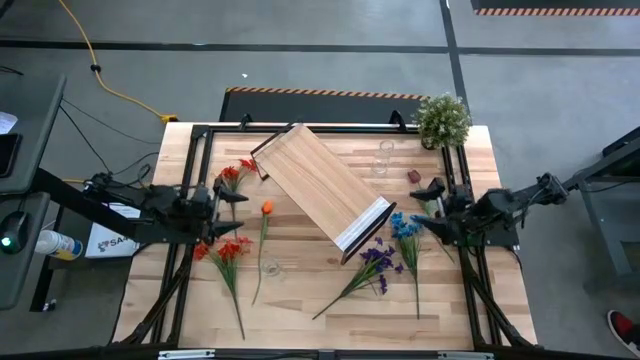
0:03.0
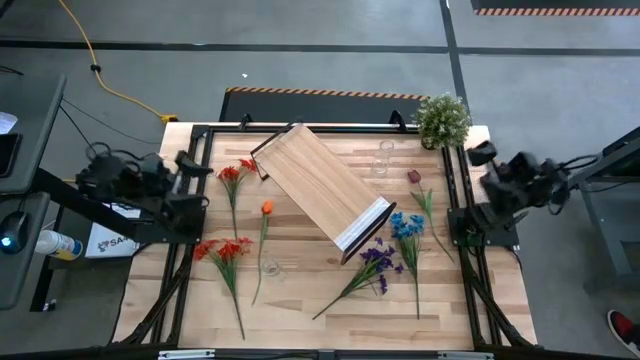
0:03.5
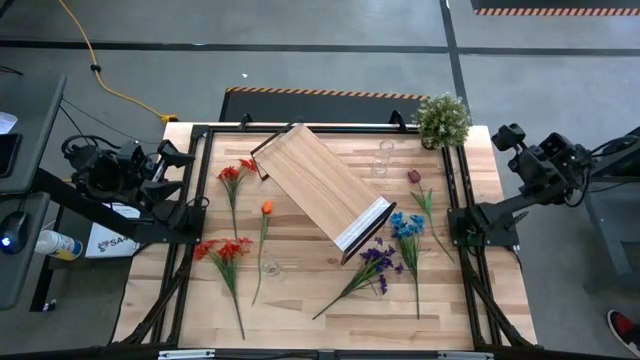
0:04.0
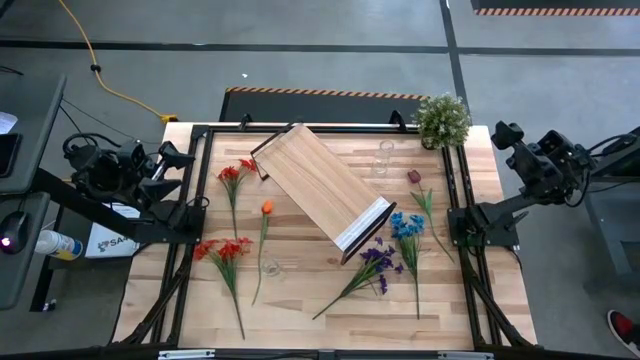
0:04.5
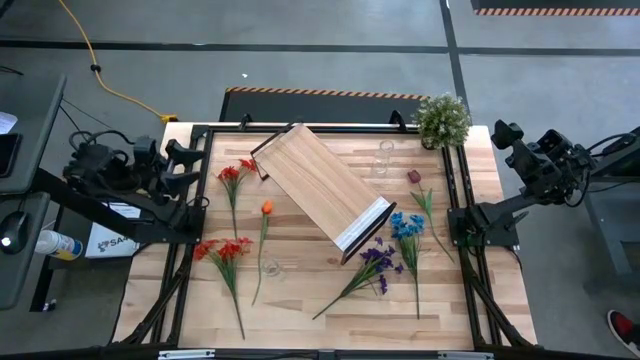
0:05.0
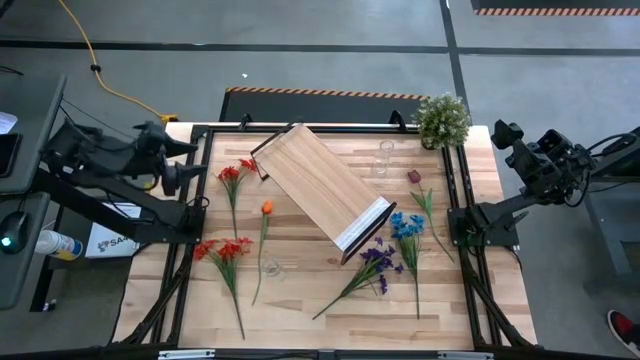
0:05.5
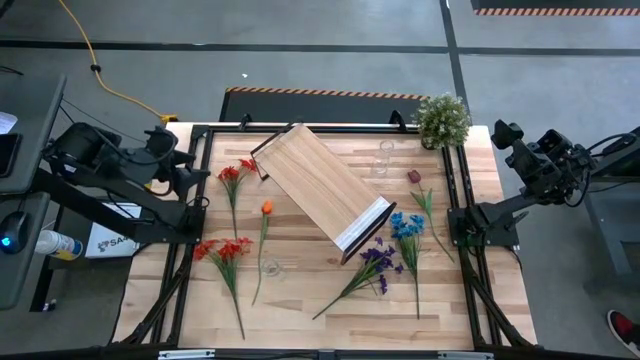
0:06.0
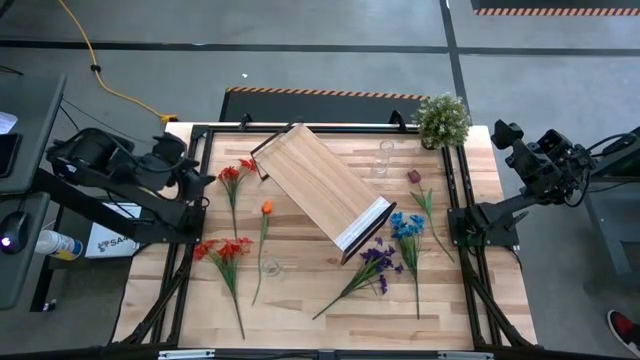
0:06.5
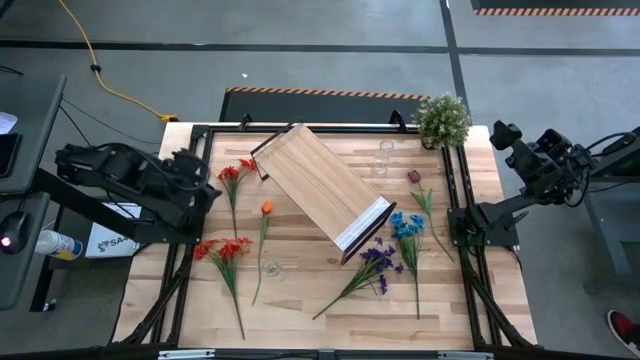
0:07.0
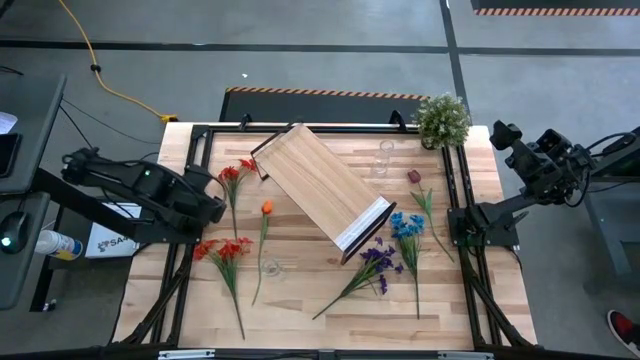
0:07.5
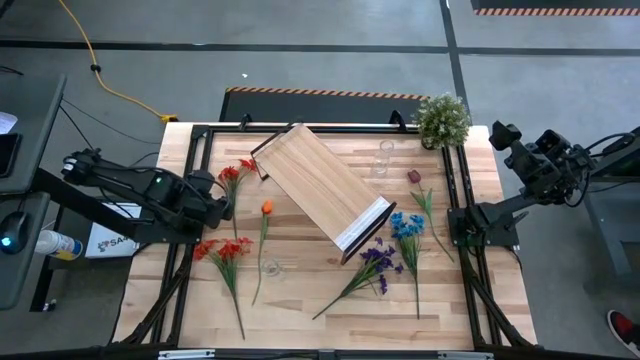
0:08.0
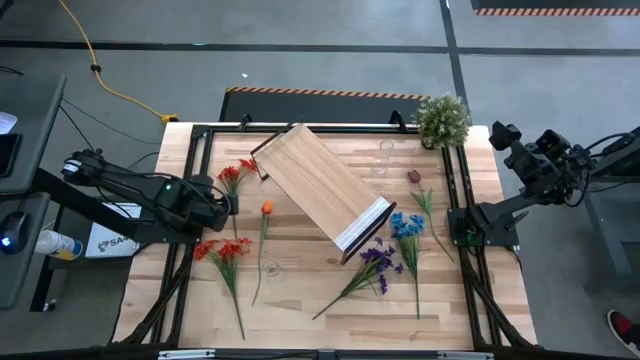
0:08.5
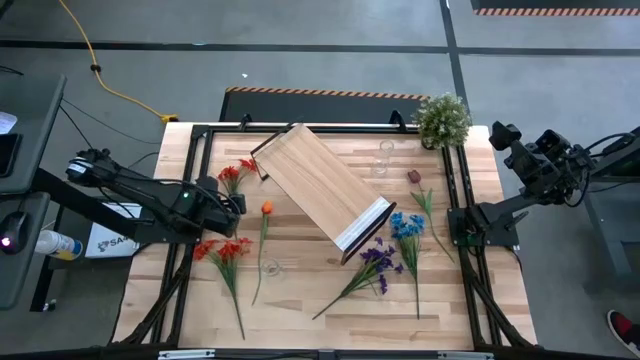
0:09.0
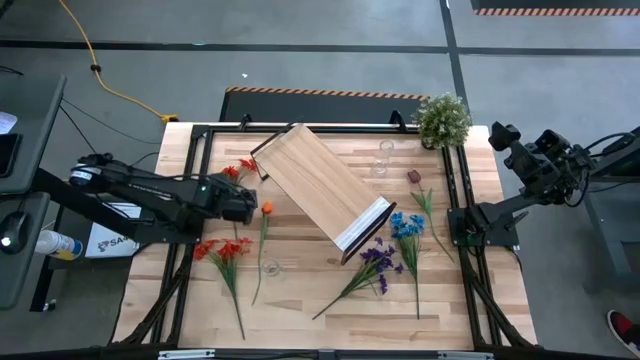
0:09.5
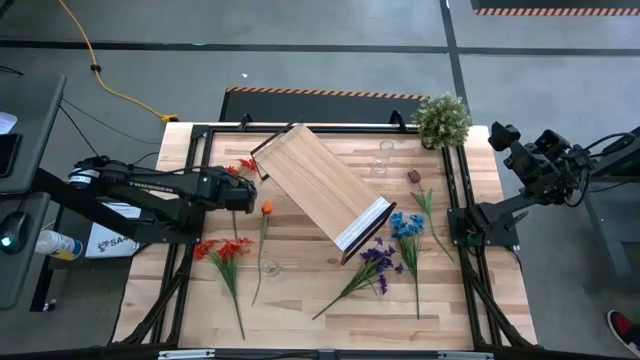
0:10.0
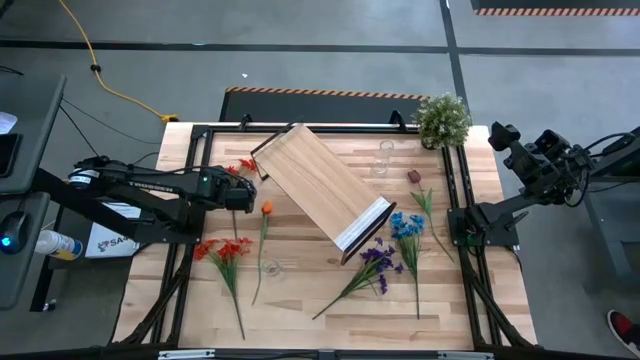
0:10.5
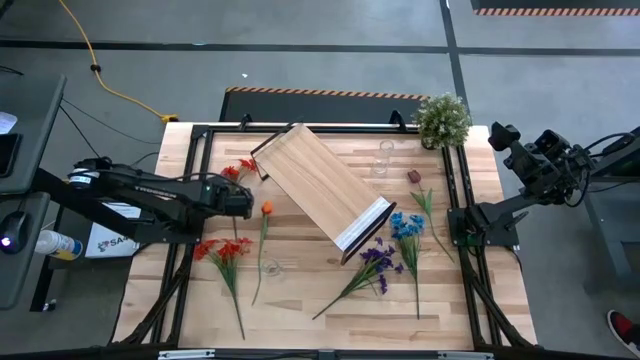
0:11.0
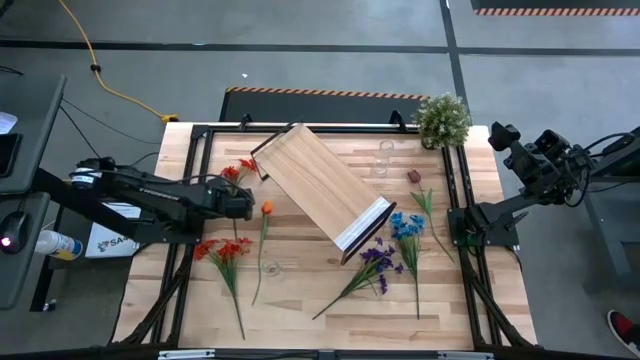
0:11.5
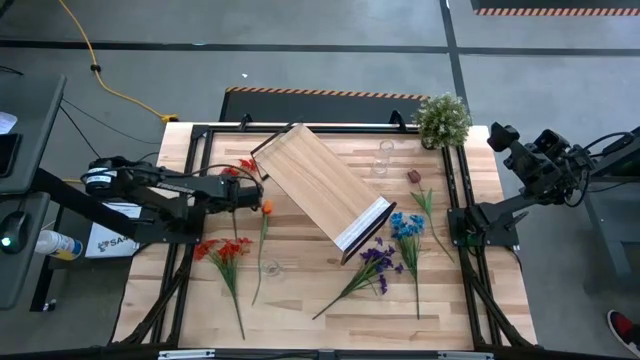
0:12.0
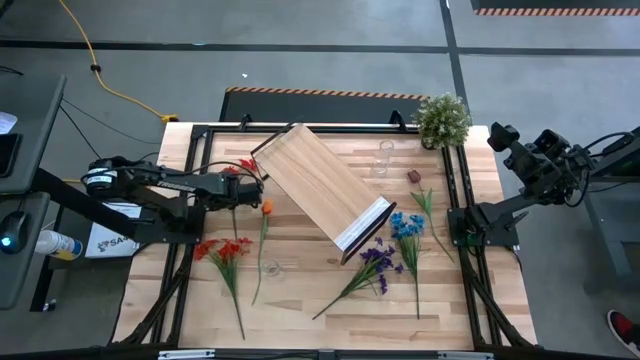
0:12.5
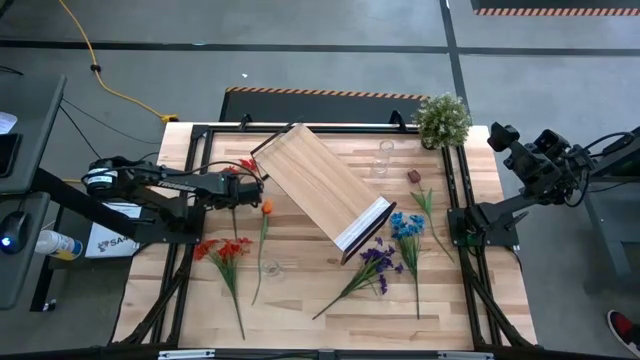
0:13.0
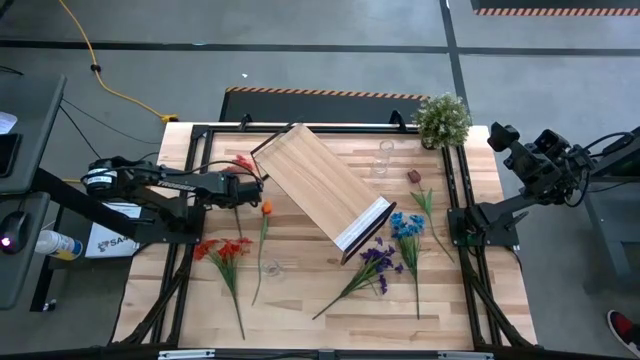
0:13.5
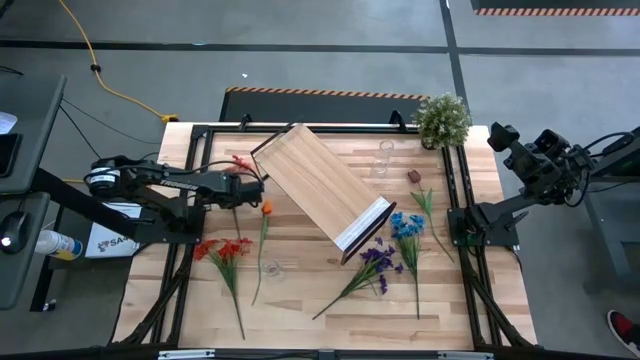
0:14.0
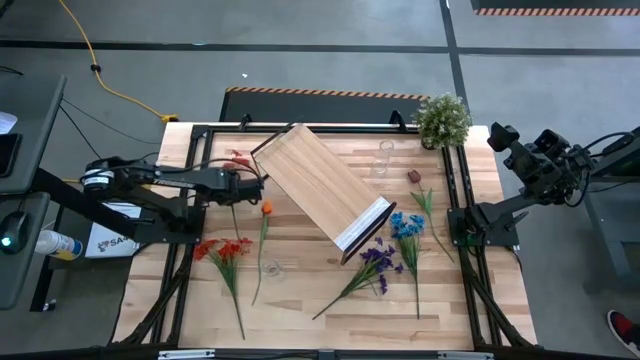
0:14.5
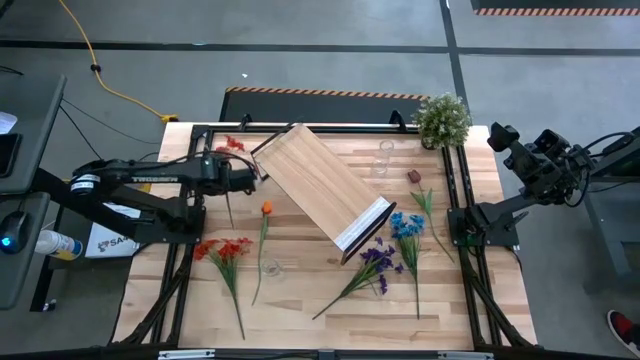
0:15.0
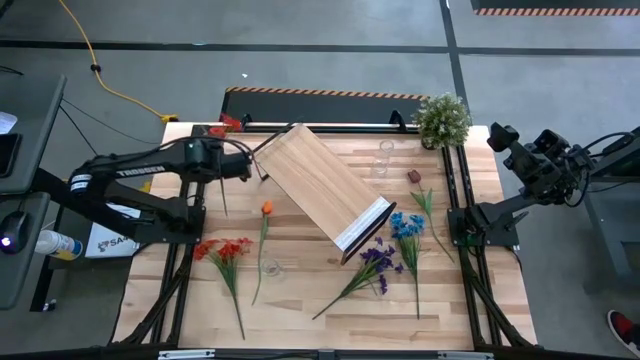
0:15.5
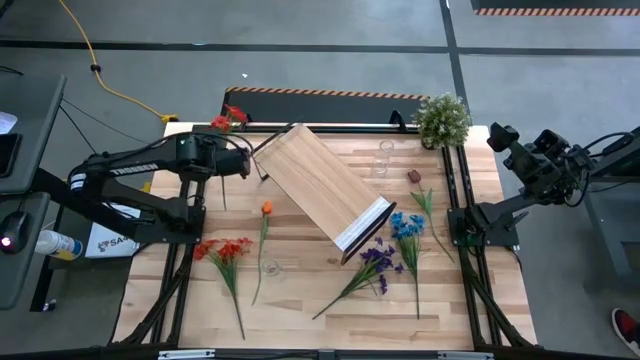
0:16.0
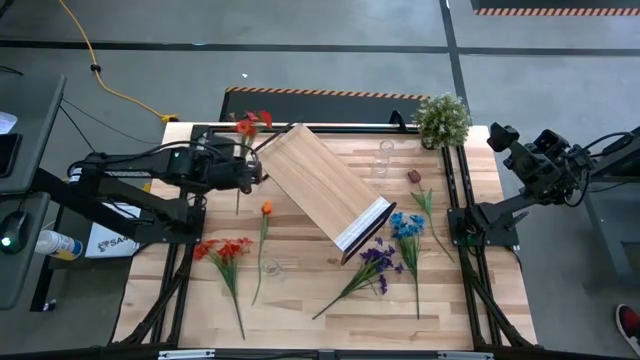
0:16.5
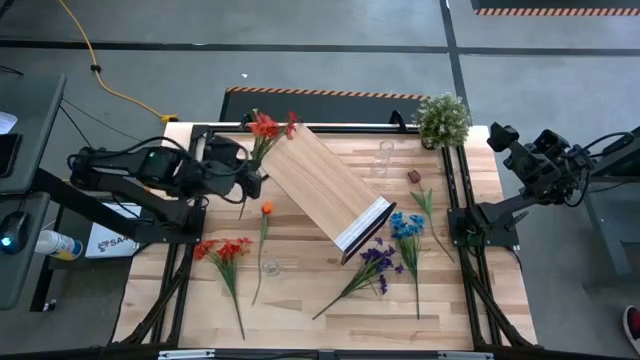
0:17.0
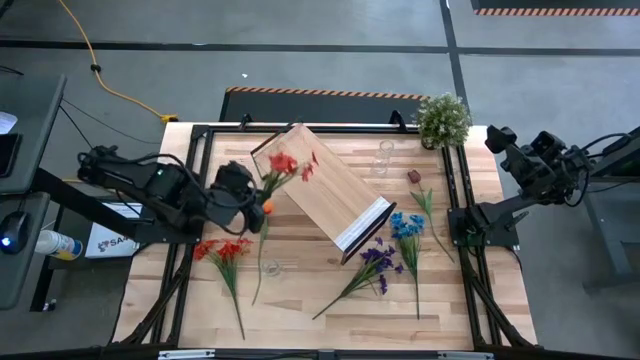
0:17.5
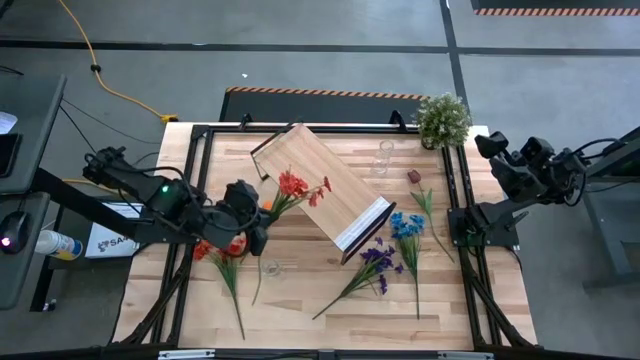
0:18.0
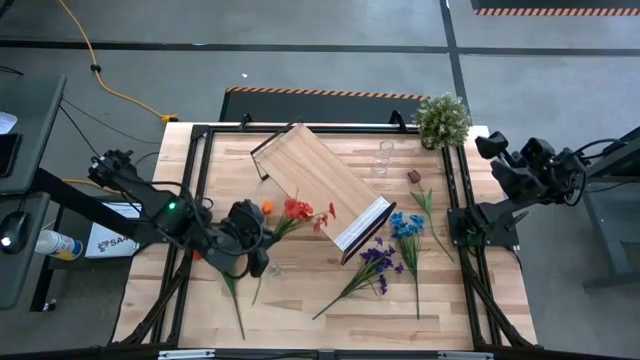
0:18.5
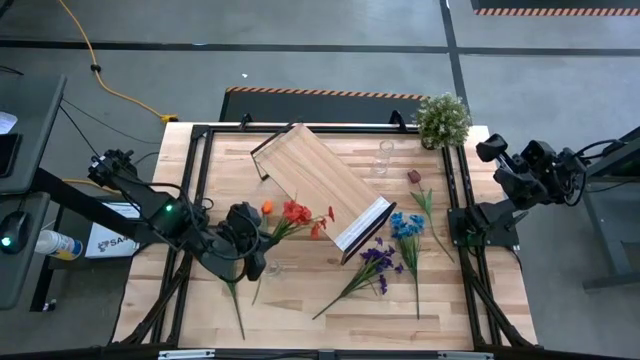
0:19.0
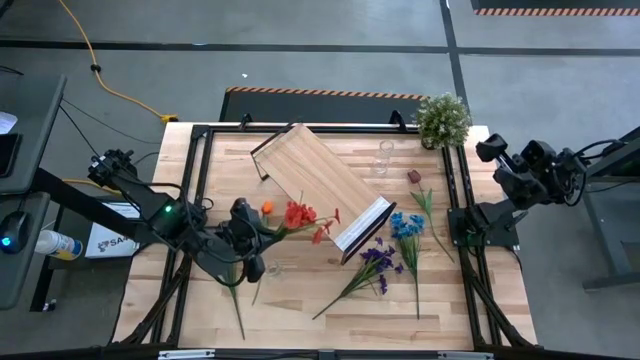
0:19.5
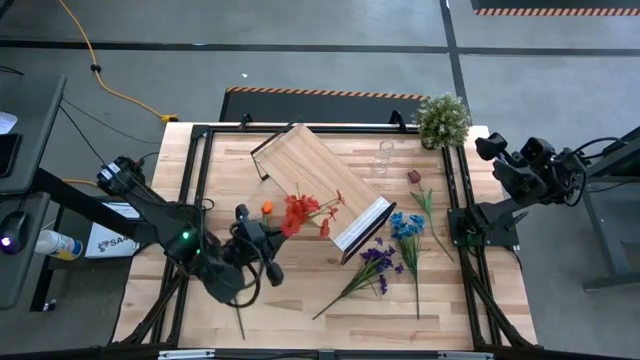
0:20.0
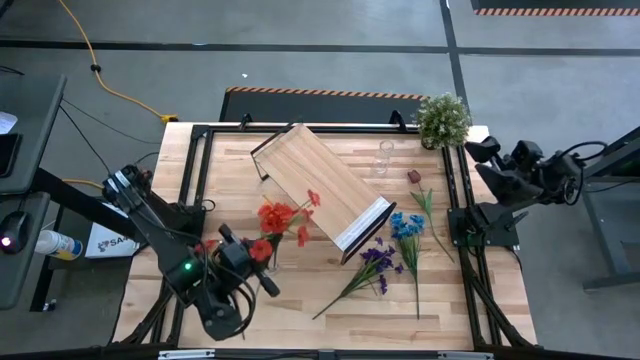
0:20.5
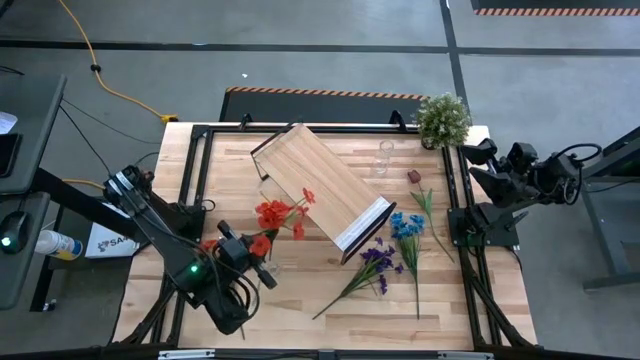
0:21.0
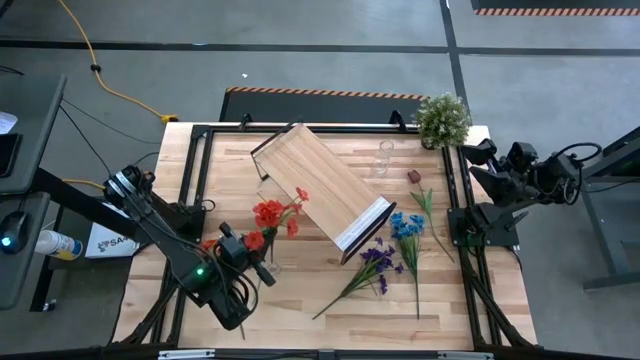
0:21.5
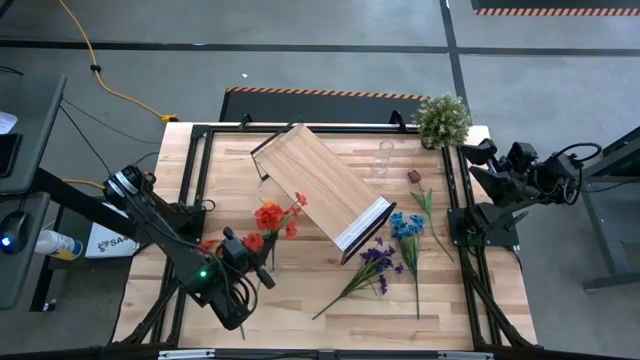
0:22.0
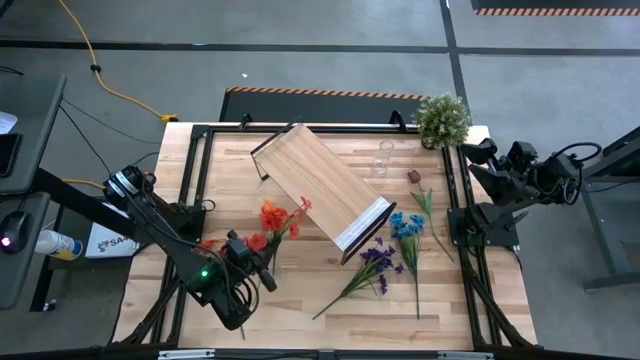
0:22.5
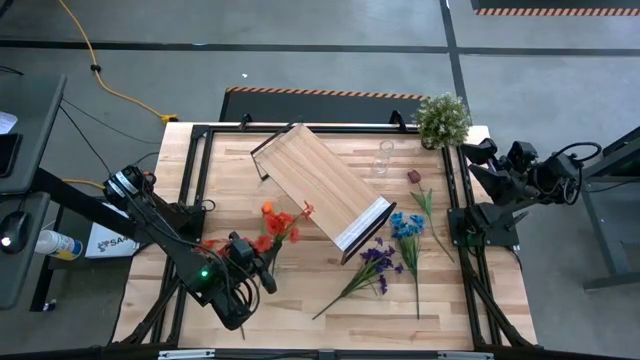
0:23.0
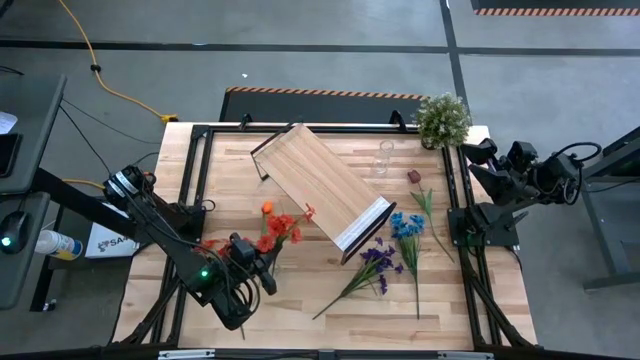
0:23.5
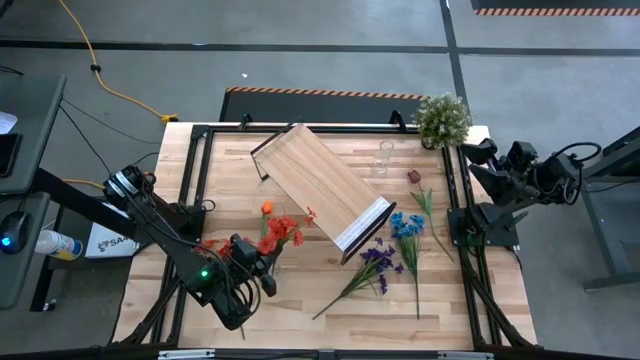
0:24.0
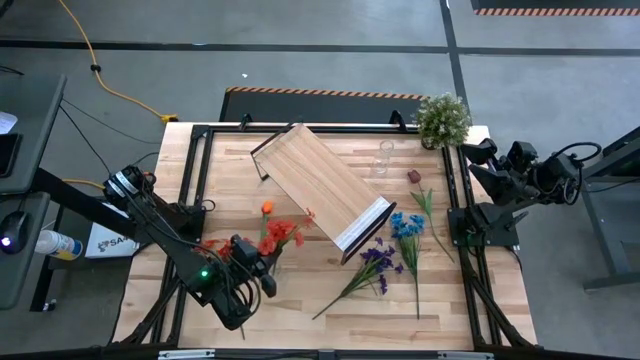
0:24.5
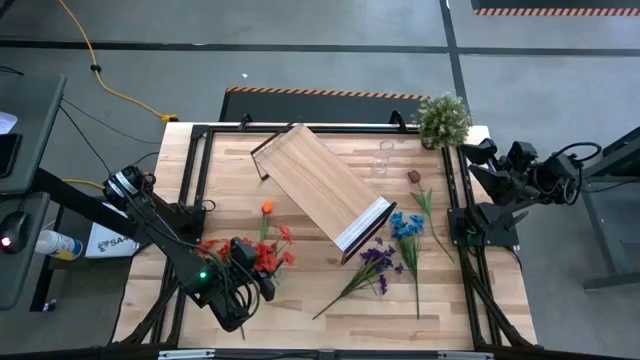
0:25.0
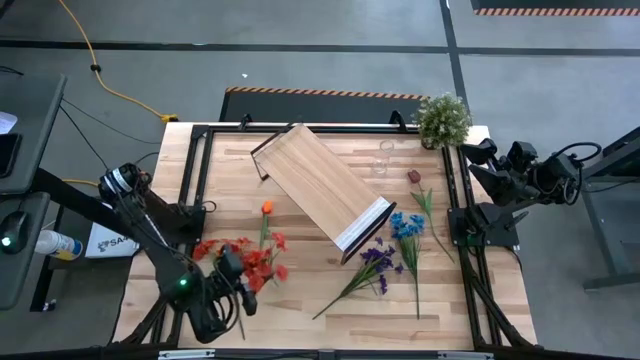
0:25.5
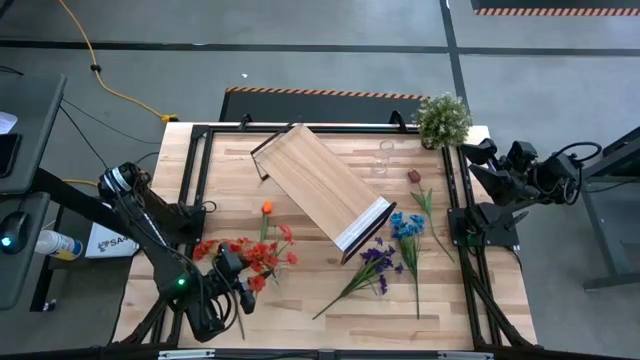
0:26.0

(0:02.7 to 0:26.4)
Task: Pick and place flowers into a vace then onto a shelf
Put the top orange flowers into the bottom transparent vase
